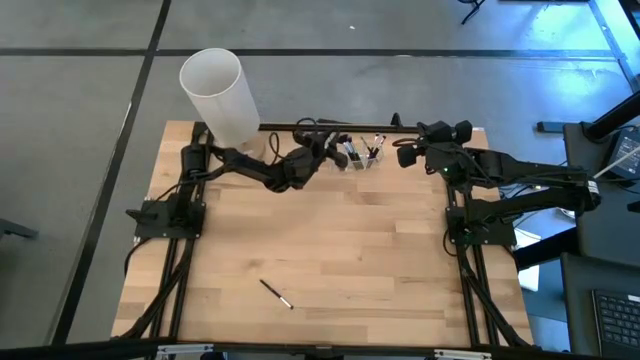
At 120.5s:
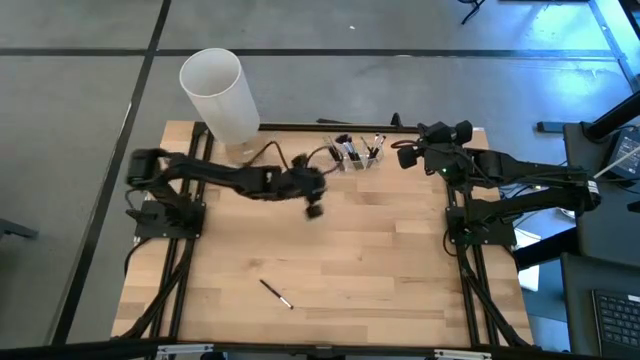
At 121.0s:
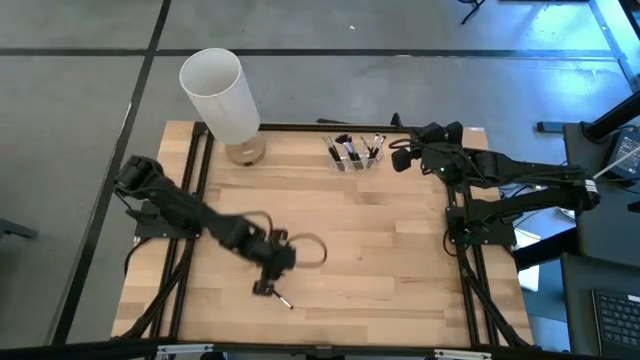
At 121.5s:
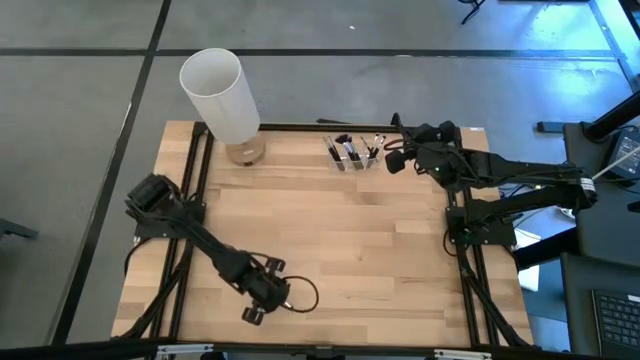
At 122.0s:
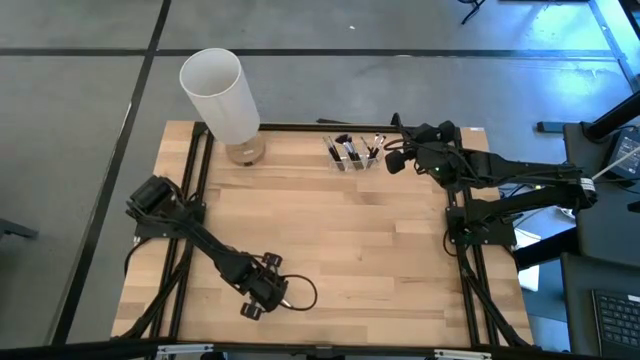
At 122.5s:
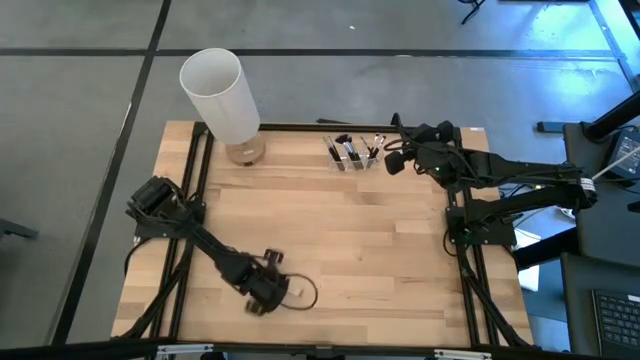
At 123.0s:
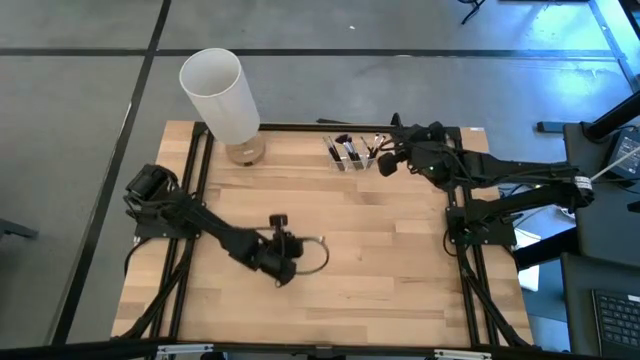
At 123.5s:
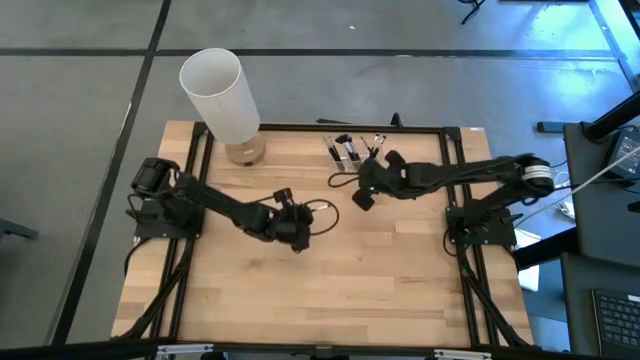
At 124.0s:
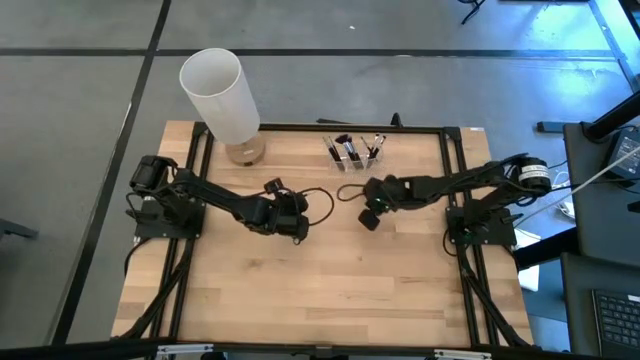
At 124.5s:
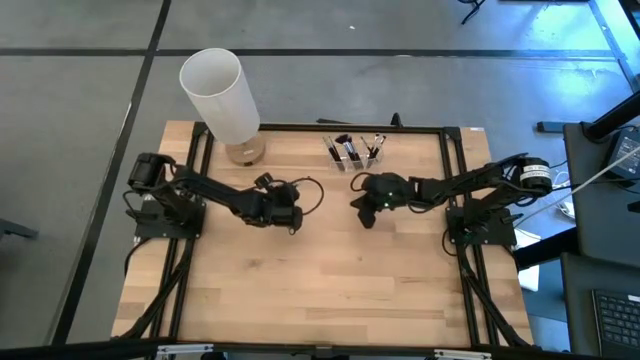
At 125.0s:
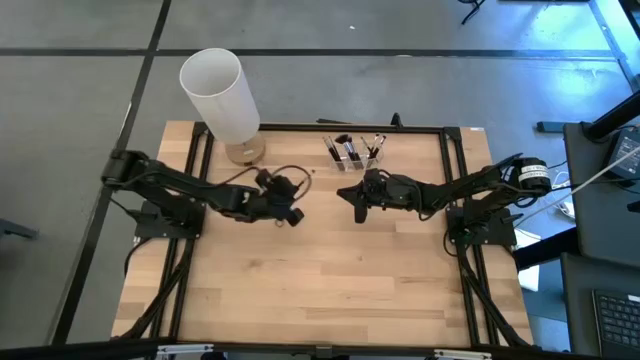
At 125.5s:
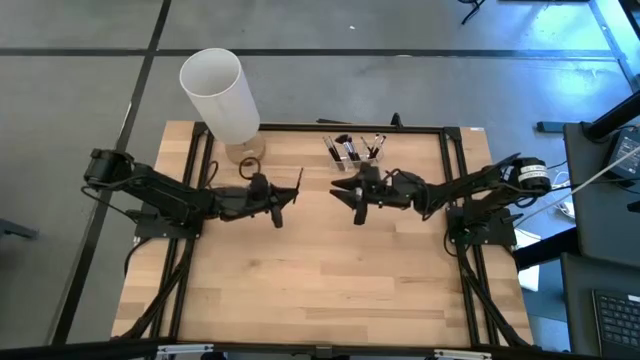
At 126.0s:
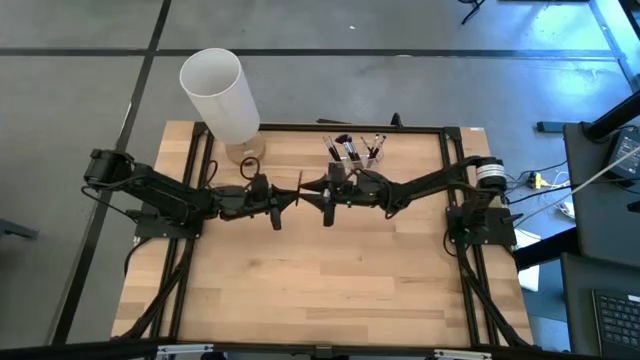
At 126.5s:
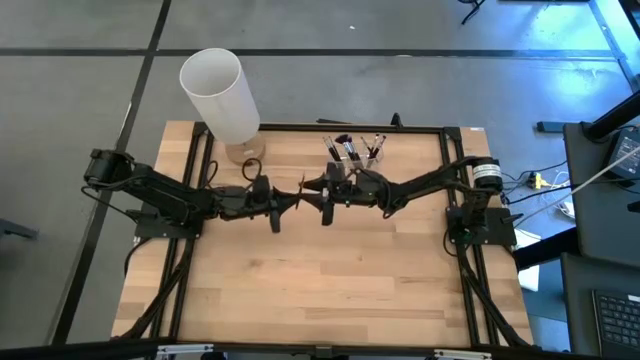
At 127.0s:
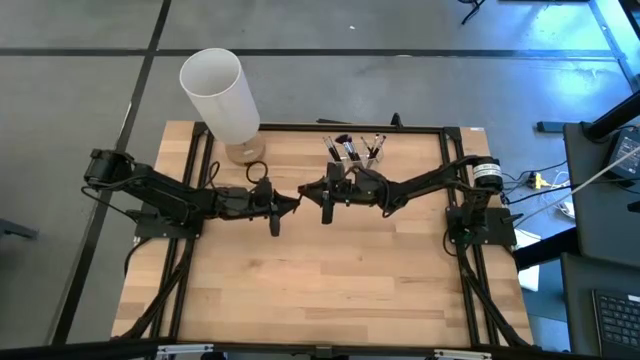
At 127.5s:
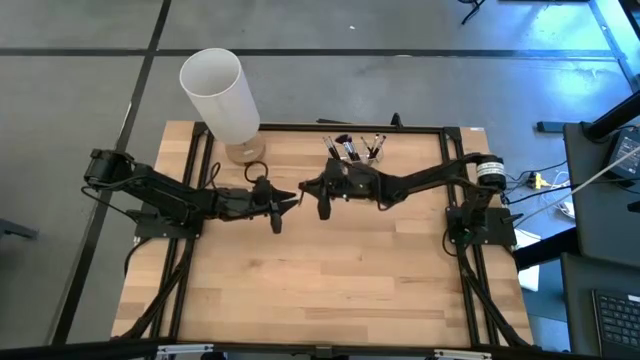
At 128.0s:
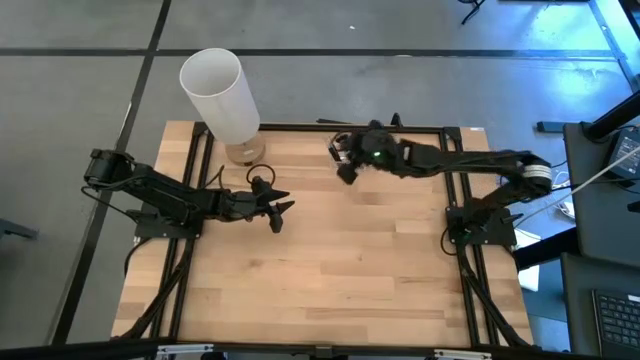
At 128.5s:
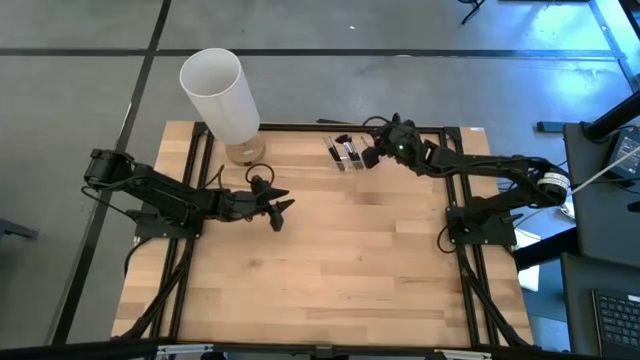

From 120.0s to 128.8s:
Task: Put items in baskets/containers
Put the black eyeshadow brush into the transparent organizer

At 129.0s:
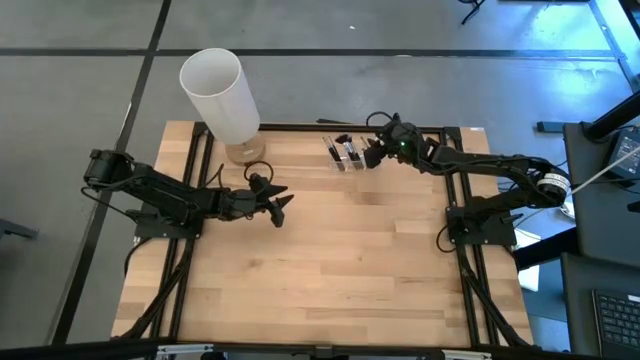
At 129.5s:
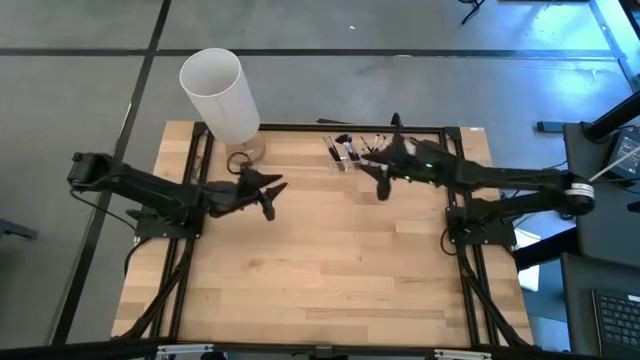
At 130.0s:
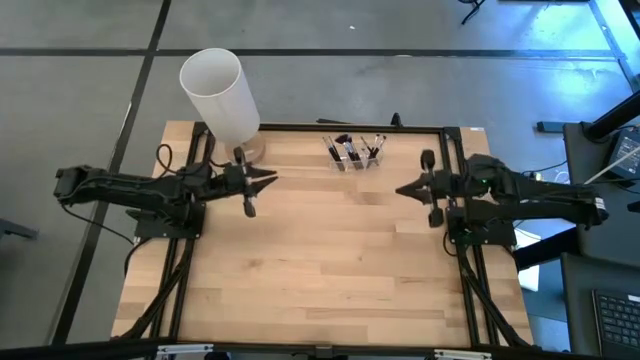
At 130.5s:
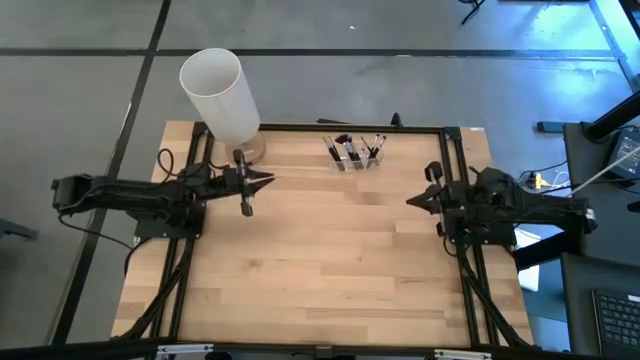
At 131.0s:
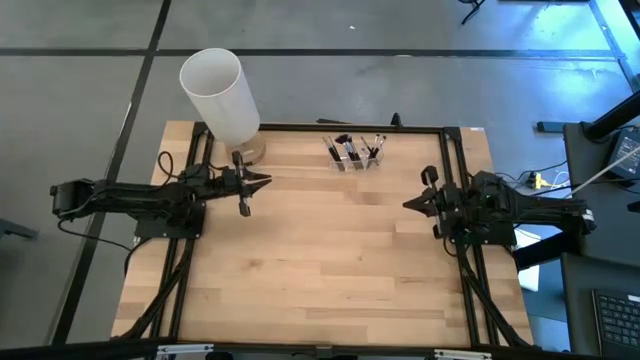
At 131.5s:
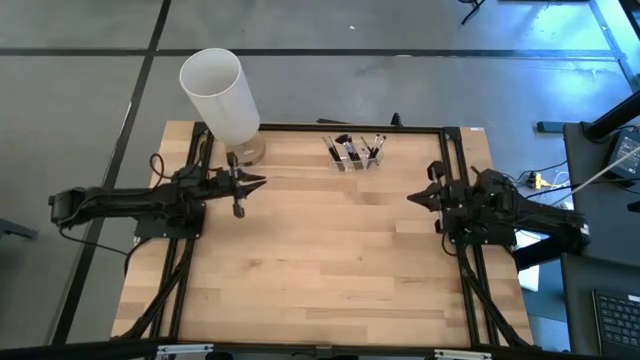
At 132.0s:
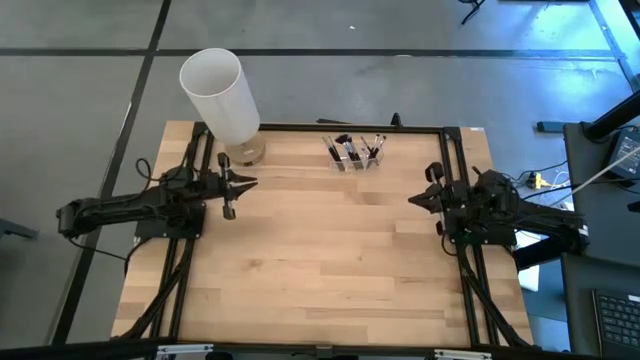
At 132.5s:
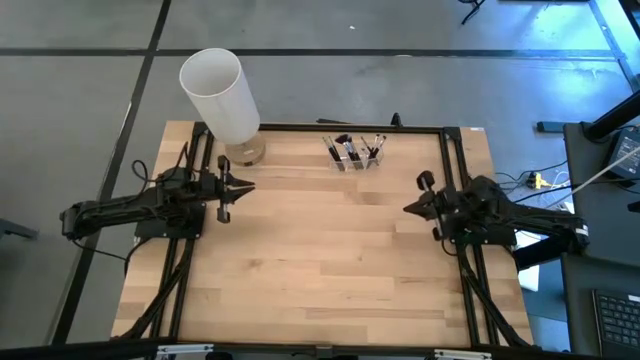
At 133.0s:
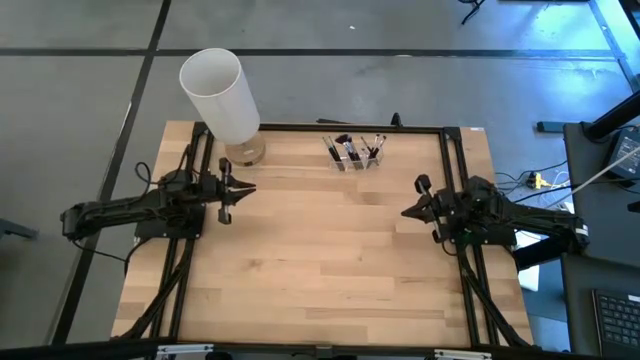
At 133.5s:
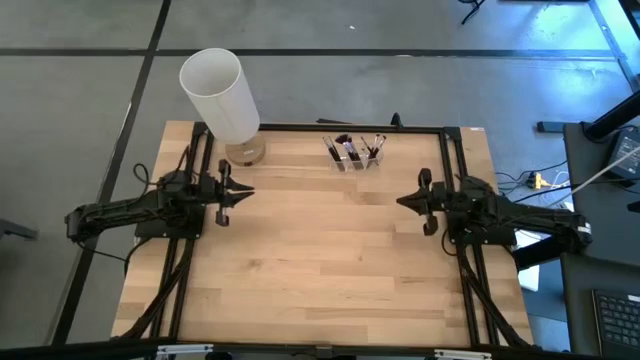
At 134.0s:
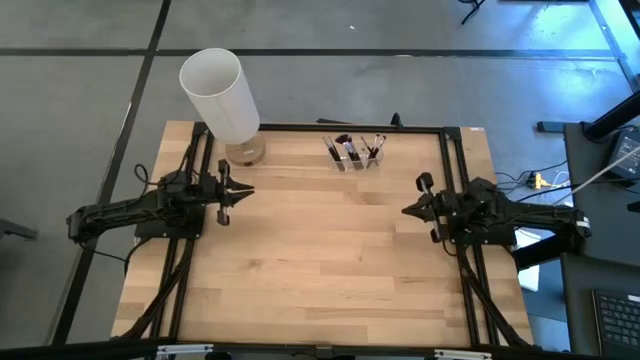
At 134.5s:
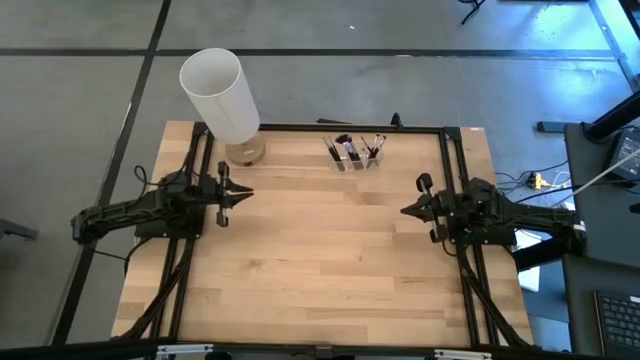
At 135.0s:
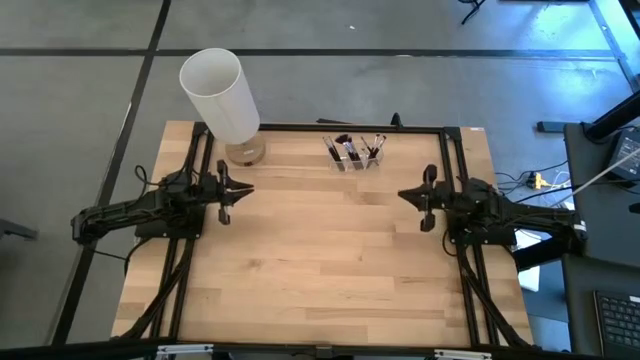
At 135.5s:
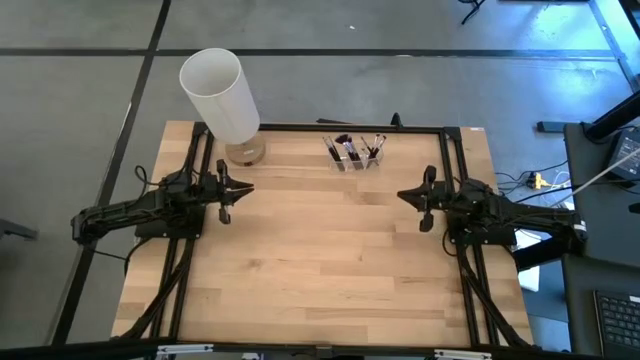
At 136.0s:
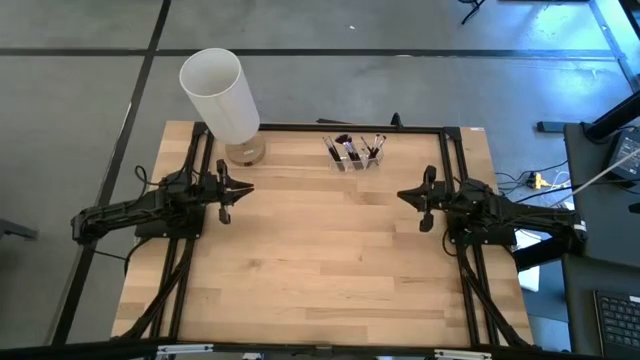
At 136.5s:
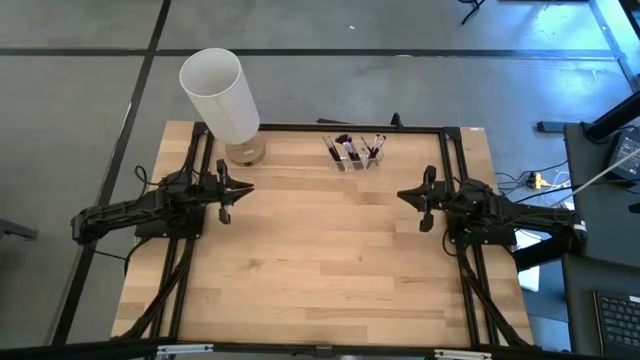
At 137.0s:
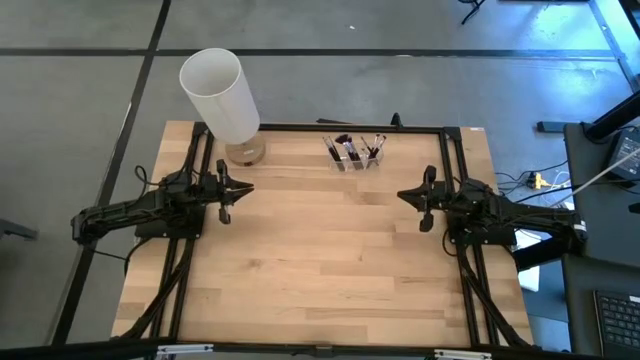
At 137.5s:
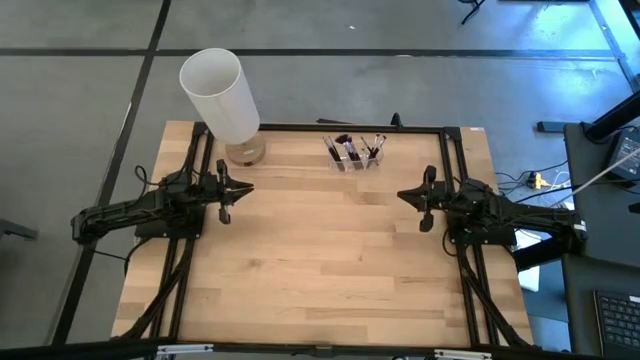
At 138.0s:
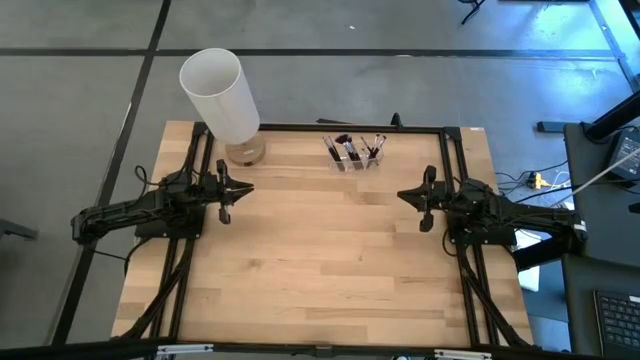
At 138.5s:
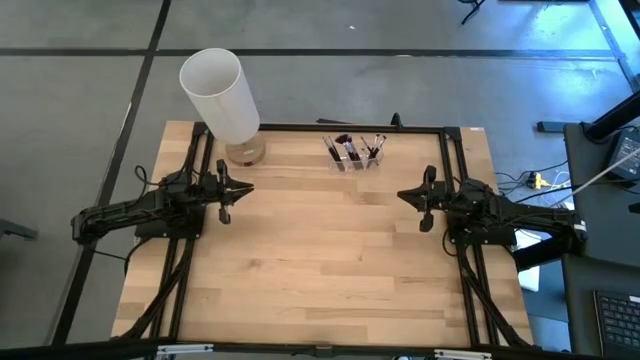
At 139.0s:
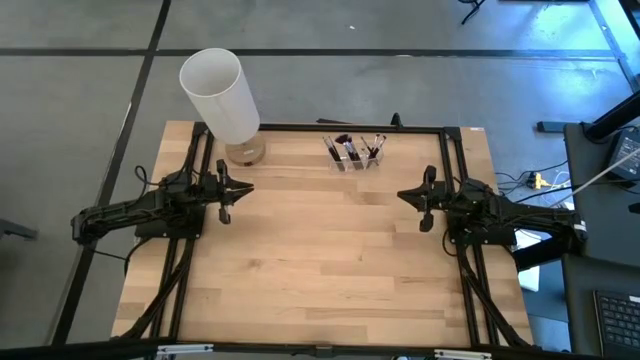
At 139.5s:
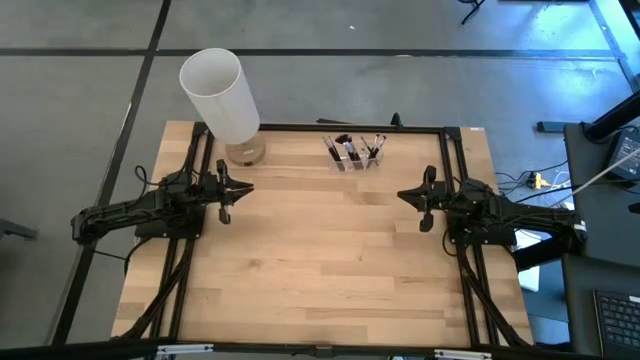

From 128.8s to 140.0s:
Return to Home Position

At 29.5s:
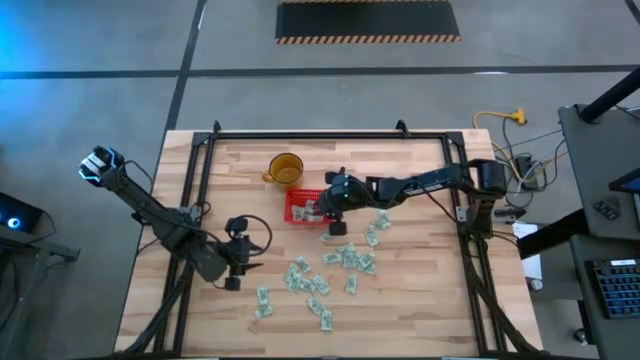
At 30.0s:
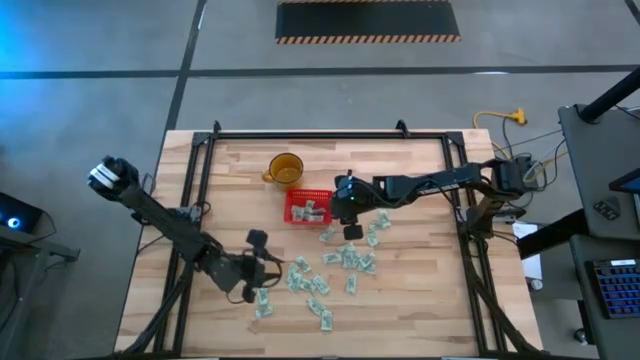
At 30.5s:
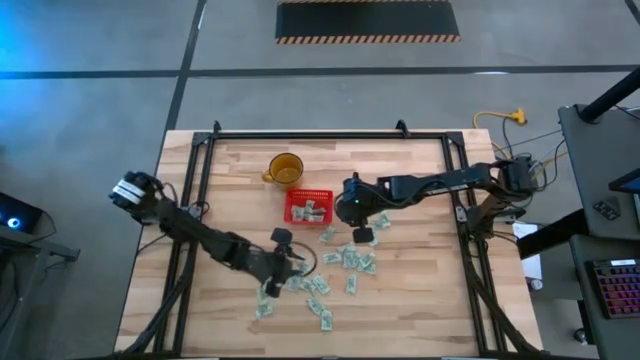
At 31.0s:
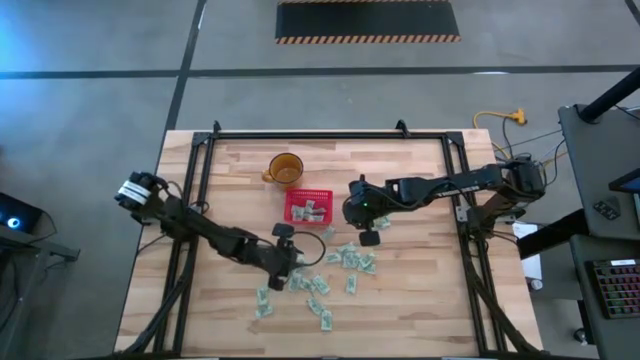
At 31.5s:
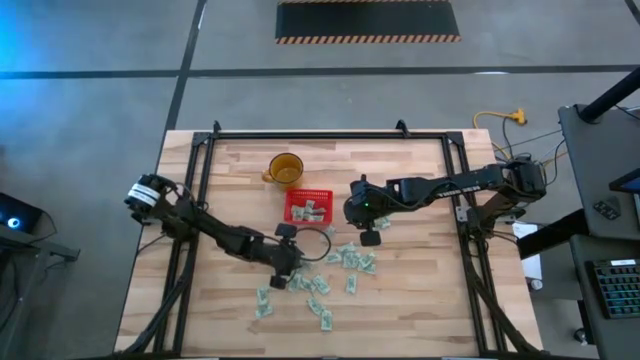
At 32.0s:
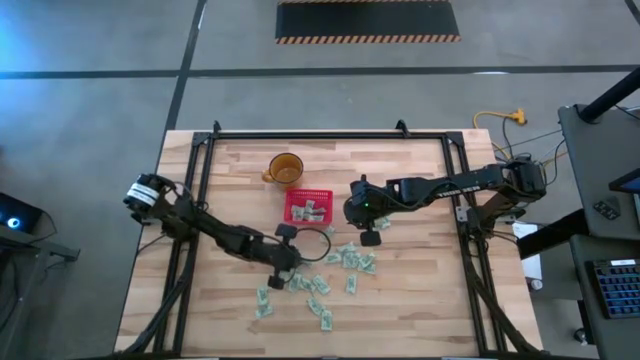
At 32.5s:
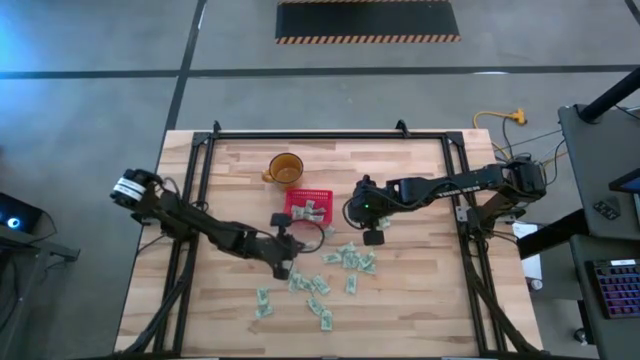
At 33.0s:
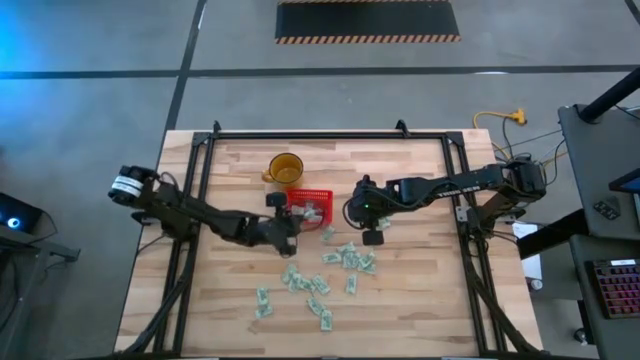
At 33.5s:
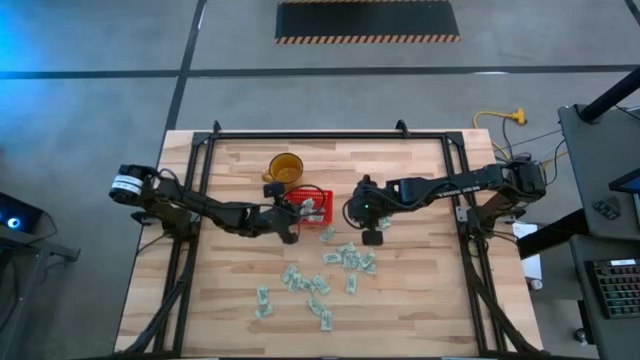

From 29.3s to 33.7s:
Task: Pick and place Stevia / Truvia into bins
Put the gray stevia packet into the red basket
